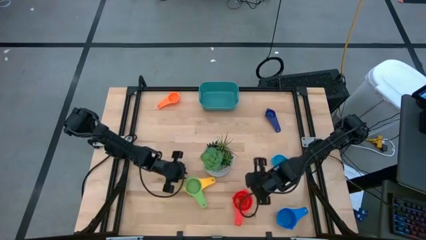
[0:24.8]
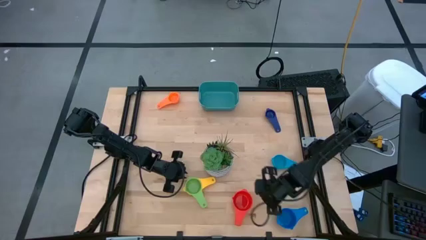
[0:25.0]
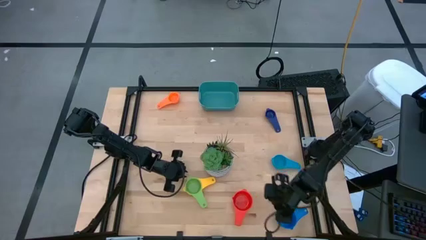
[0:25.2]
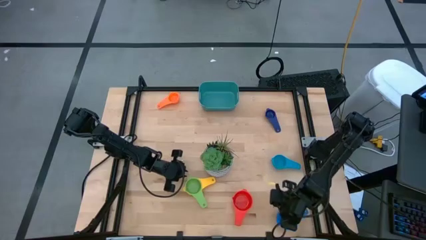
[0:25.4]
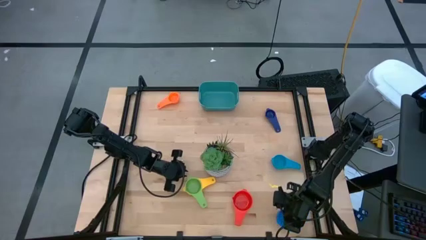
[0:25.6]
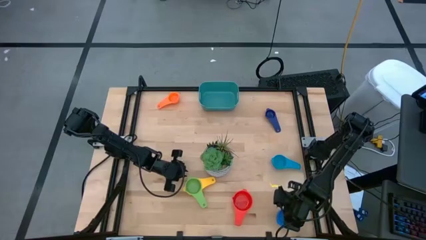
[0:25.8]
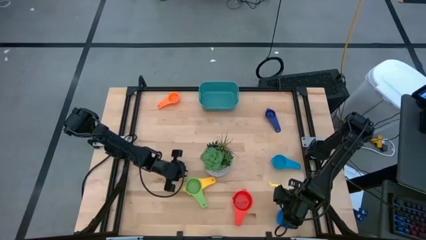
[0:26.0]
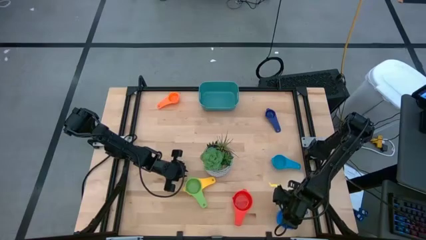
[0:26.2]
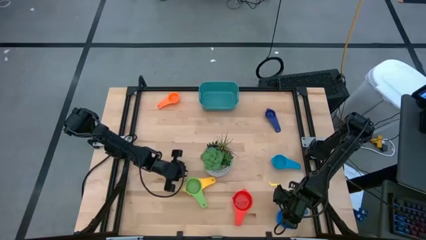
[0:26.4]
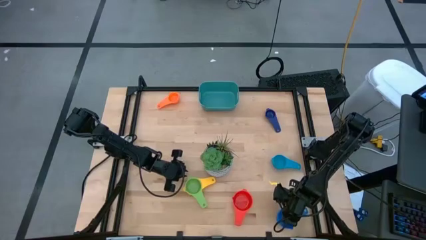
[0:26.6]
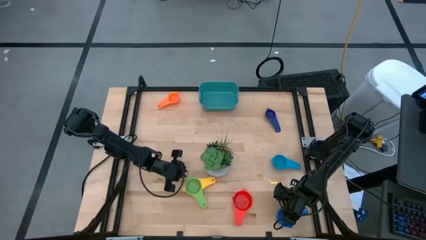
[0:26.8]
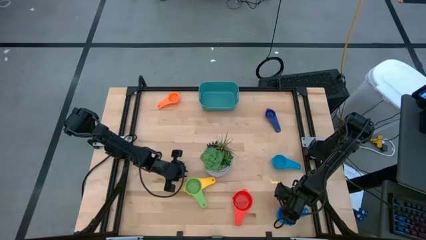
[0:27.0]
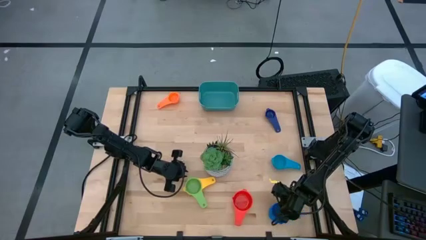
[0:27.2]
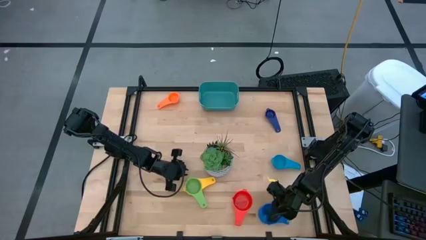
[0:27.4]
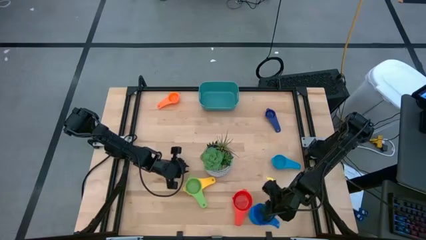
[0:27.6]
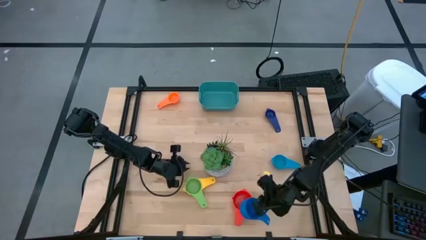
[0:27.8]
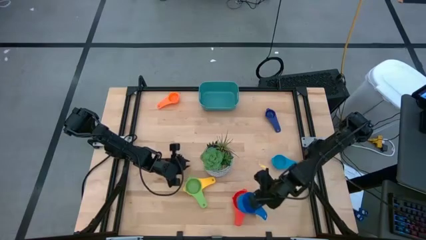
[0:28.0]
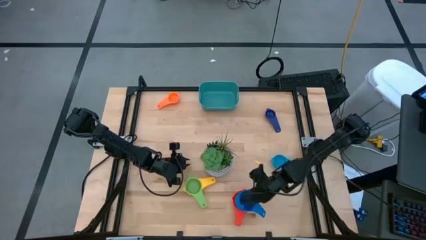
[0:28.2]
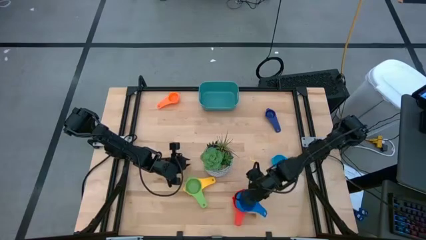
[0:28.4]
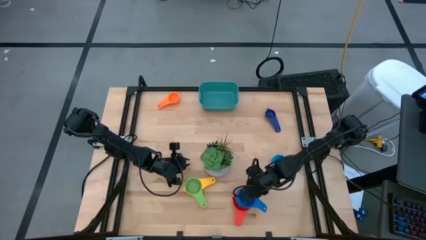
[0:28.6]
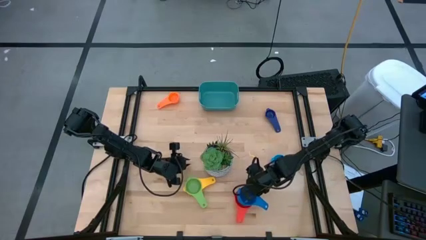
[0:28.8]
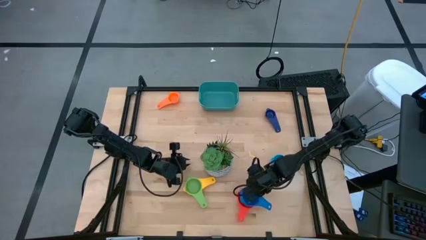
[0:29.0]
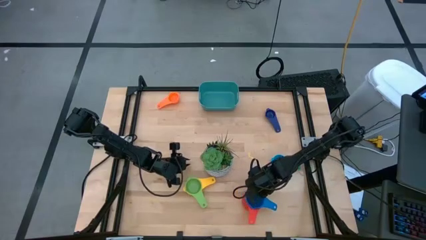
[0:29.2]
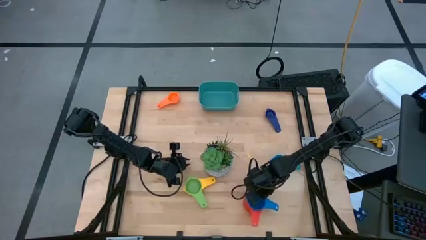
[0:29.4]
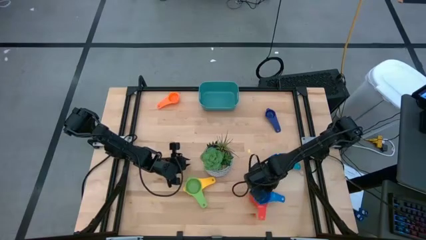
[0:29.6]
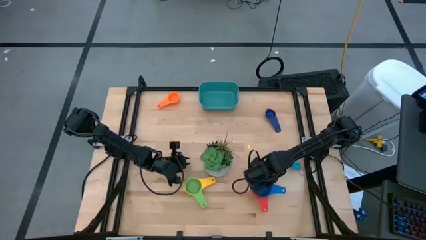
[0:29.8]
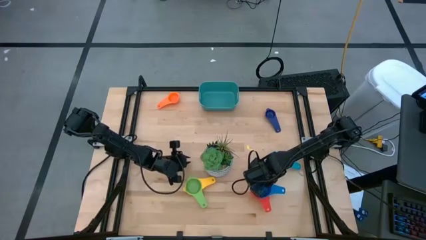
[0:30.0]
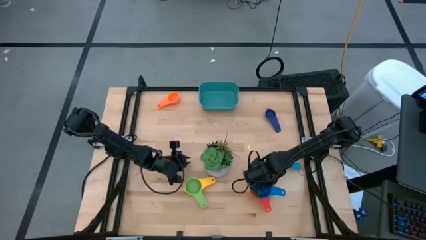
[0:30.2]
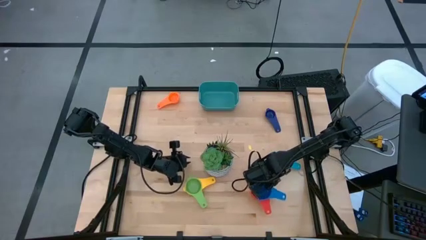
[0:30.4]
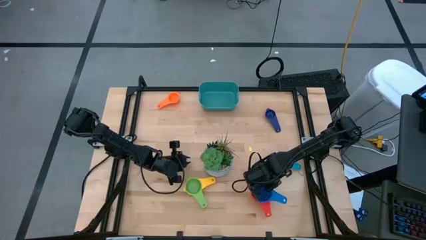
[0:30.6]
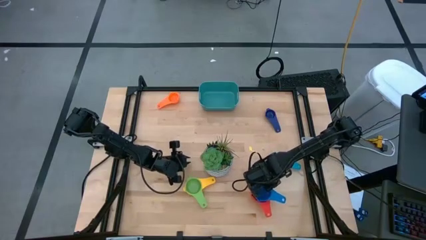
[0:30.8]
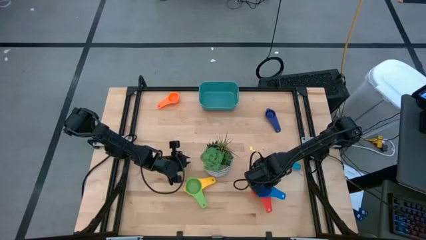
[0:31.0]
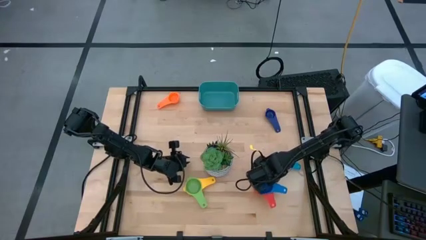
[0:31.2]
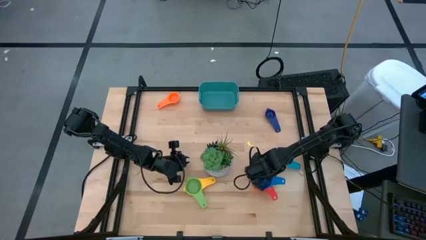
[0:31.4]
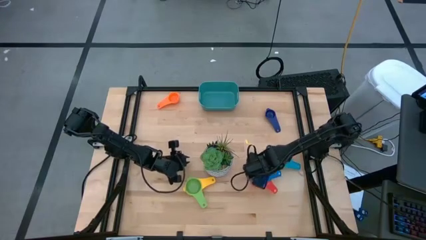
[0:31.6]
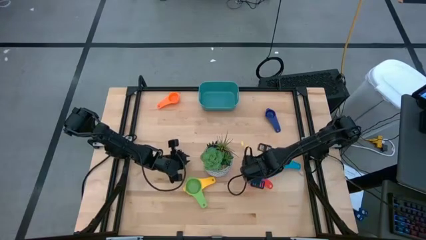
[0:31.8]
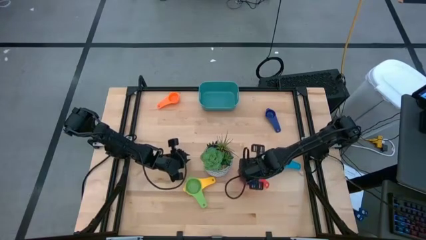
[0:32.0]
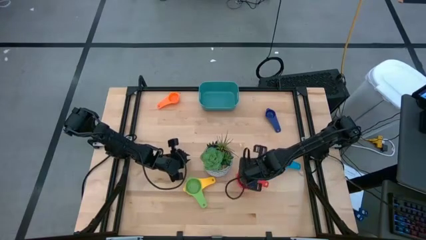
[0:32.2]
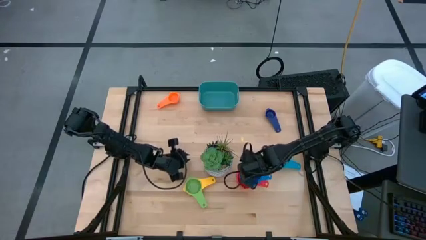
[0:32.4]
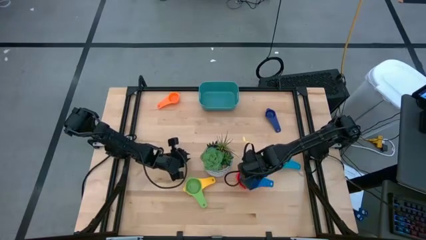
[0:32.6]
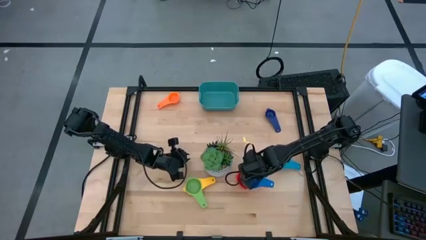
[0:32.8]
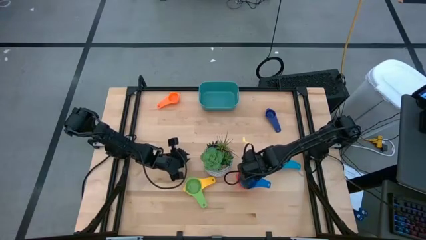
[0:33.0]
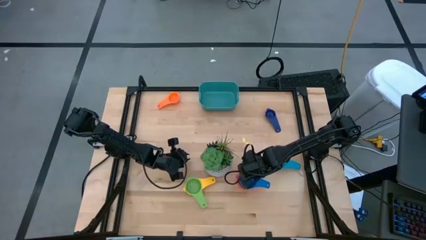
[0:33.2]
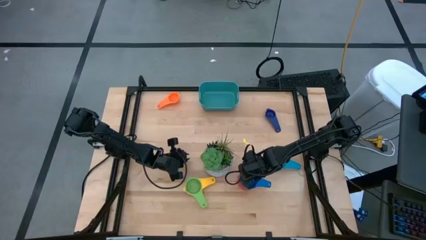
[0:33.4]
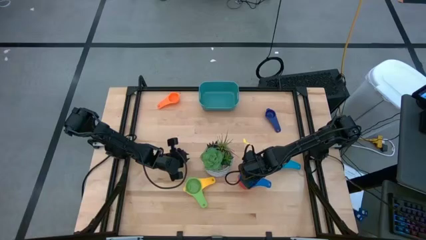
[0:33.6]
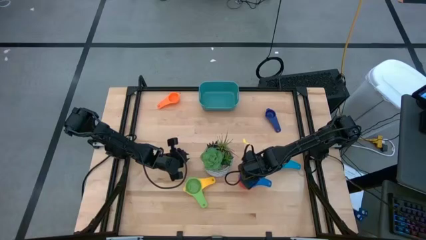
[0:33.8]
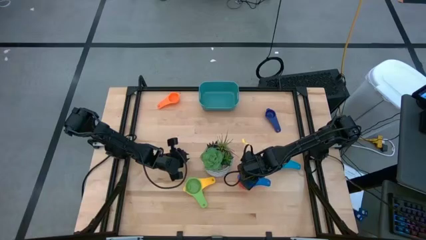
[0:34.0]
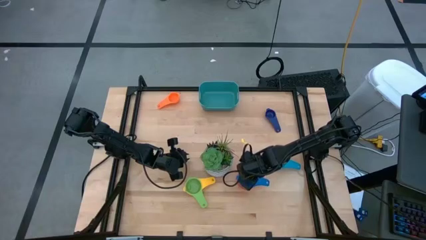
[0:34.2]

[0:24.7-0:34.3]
Task: Nest measuring cups in basket
Stack the blue measuring cup on top the red measuring cup

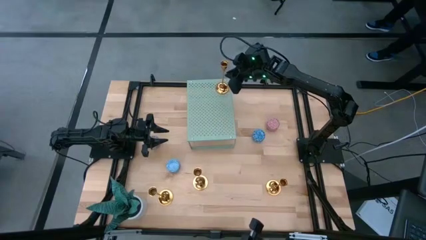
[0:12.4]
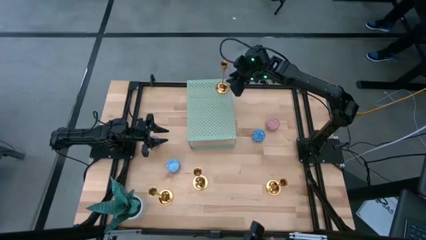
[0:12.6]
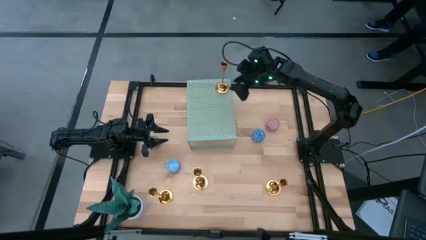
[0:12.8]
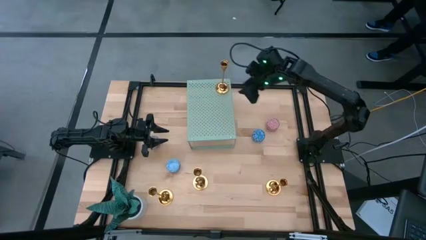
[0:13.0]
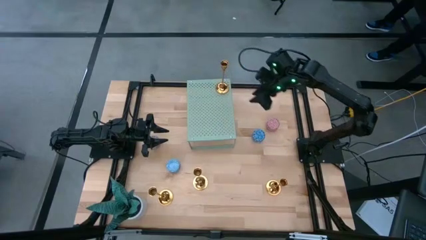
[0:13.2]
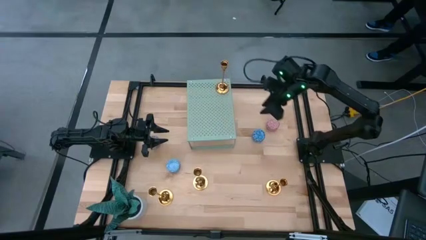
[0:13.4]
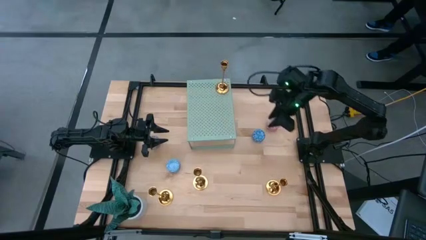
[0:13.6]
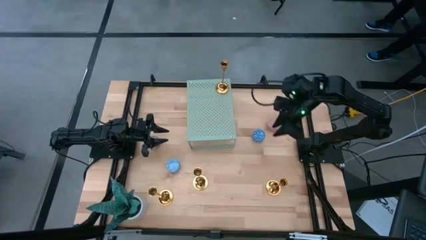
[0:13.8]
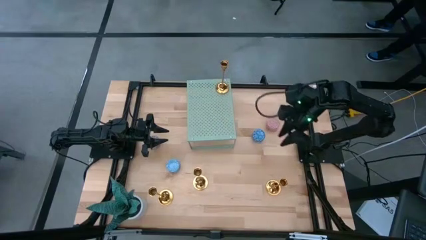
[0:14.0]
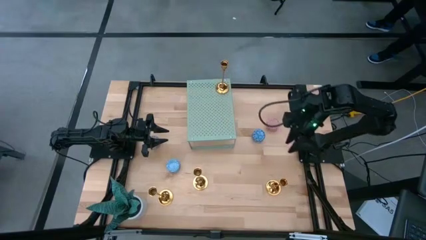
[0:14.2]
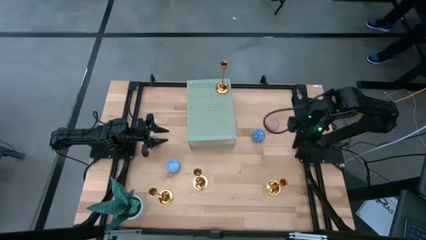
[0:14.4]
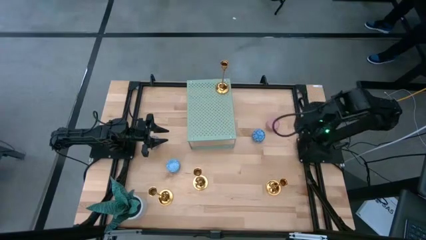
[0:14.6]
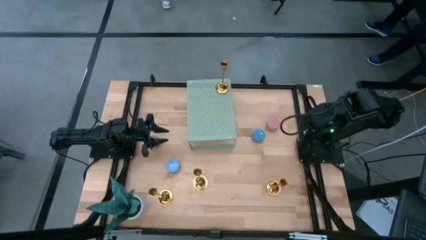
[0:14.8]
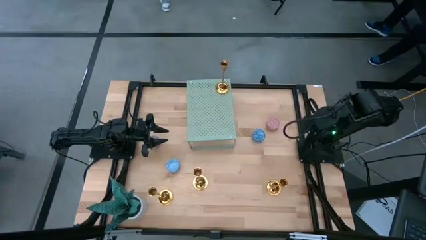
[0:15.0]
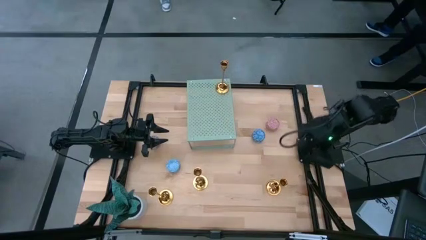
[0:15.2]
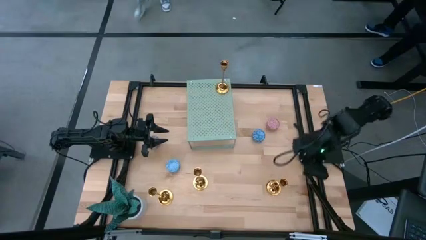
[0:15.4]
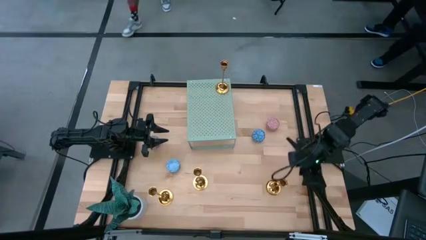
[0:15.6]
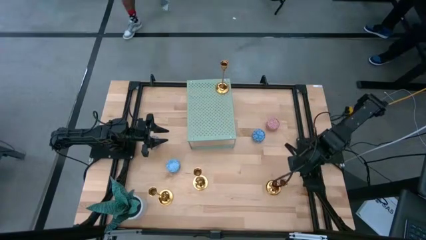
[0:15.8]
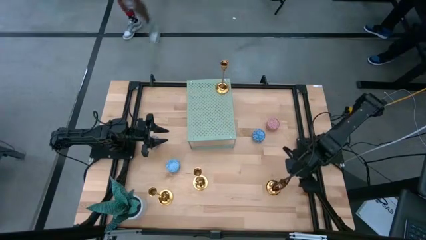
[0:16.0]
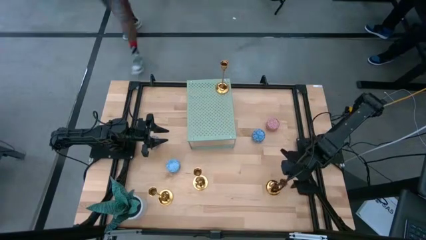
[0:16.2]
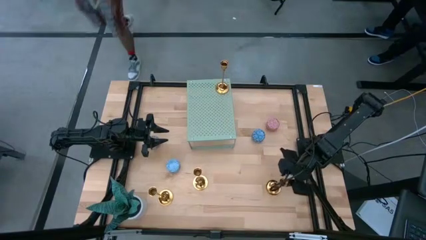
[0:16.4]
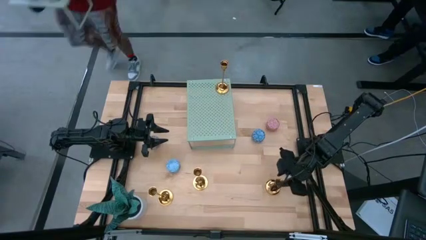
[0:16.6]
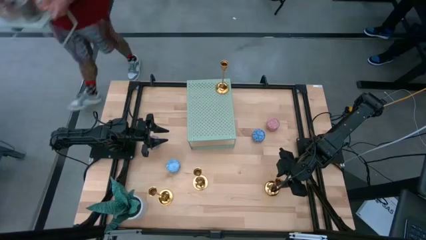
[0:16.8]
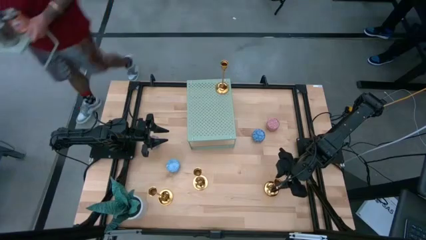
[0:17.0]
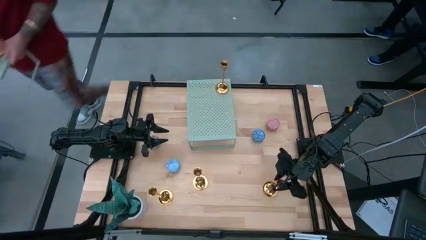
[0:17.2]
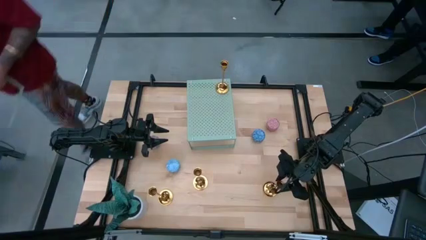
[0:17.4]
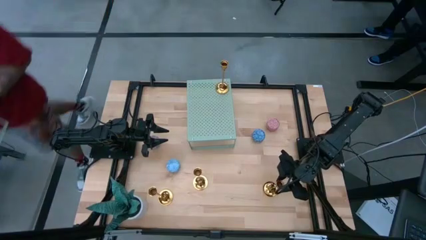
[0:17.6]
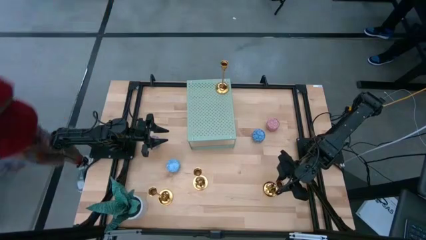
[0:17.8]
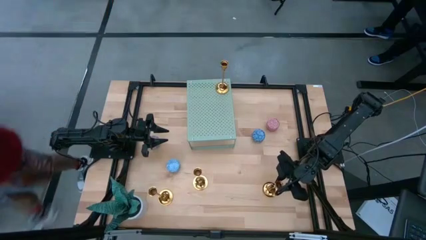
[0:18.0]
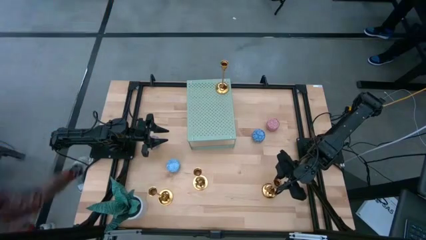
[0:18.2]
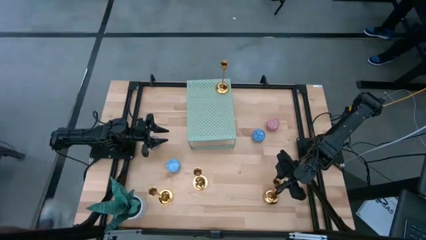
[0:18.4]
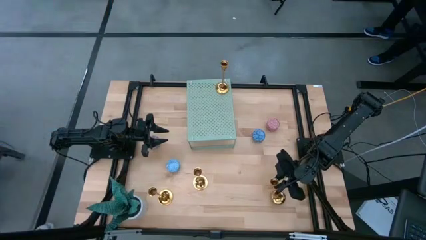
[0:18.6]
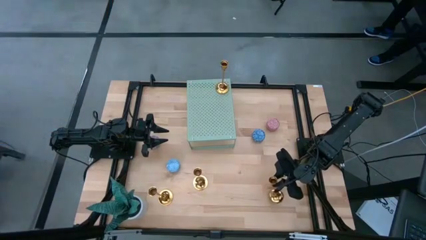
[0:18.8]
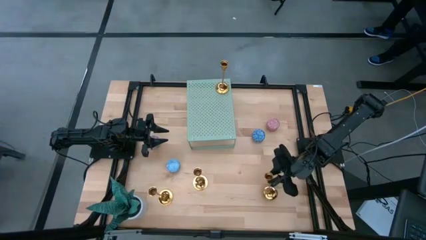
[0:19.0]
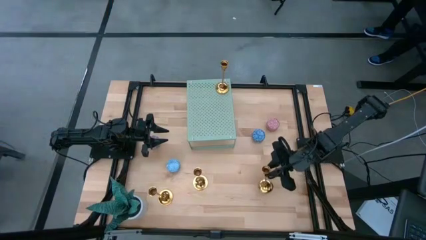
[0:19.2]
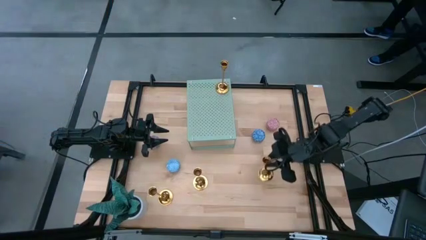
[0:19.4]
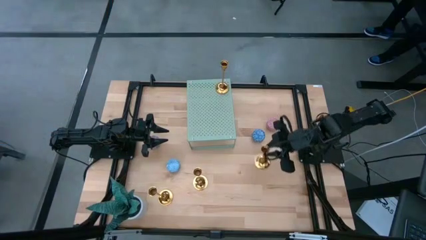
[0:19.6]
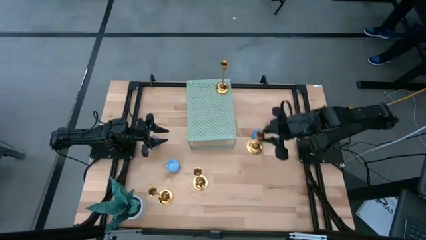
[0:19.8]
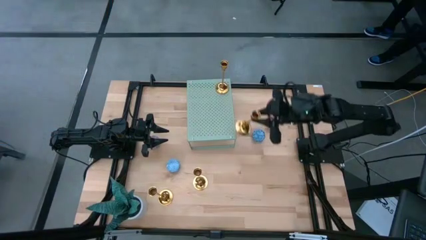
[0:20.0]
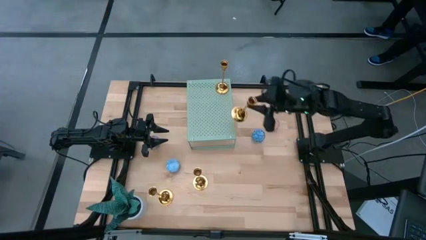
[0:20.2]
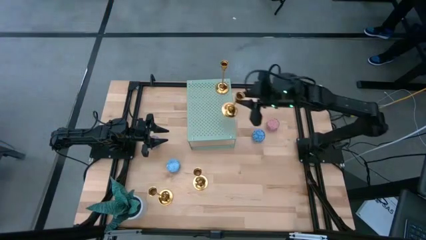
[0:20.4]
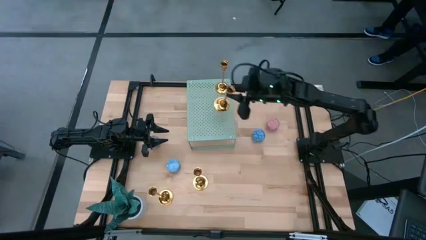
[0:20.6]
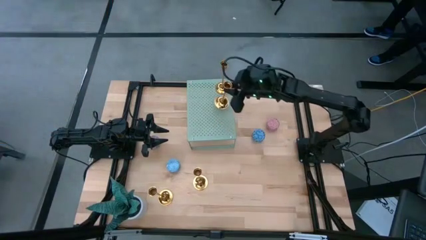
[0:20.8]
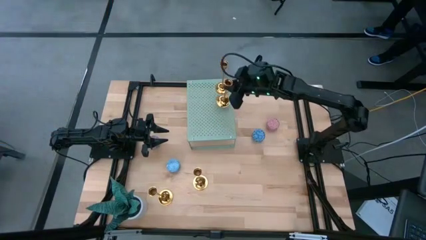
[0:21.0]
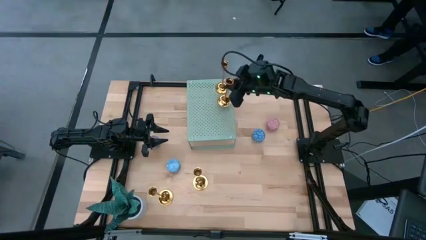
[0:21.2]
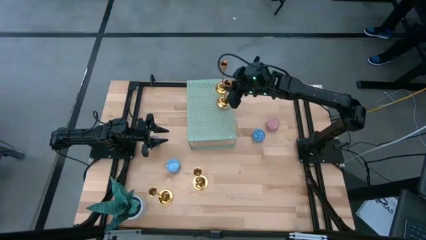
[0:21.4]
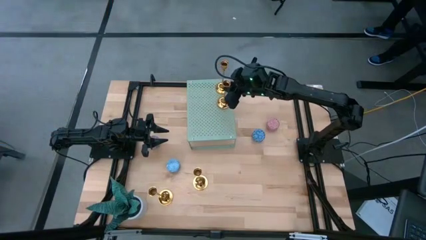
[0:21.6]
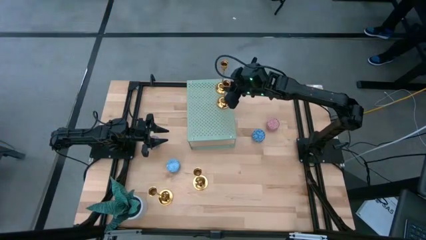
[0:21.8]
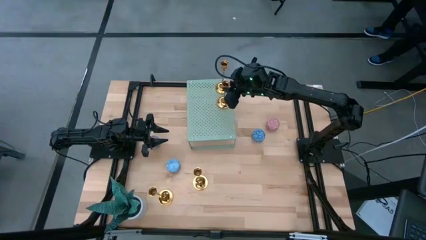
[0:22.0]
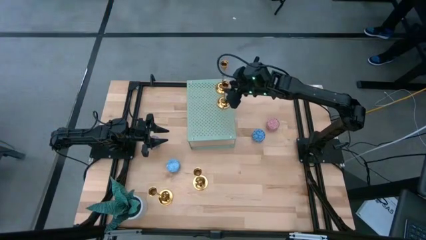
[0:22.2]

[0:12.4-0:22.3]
Task: Pick & Place candle stick holders
Align the gold candle holder with the other gold candle holder on the shelf
